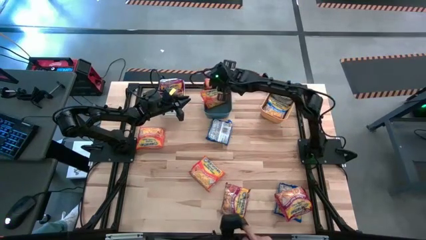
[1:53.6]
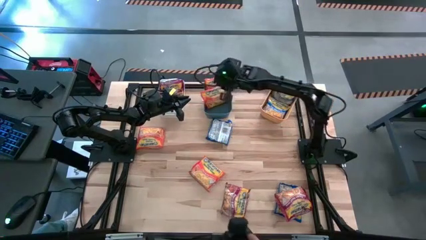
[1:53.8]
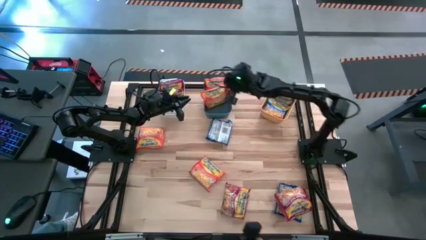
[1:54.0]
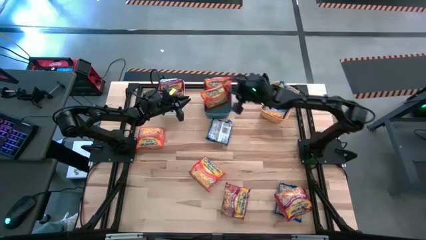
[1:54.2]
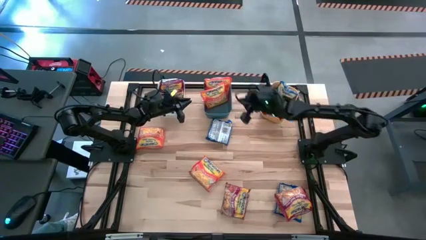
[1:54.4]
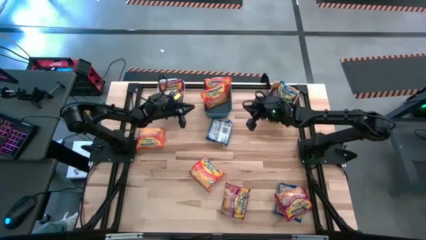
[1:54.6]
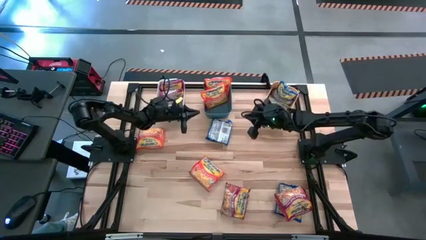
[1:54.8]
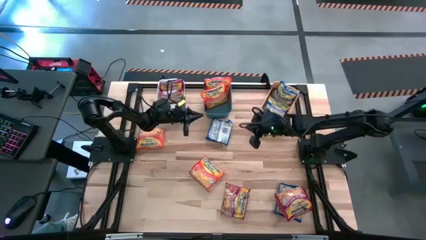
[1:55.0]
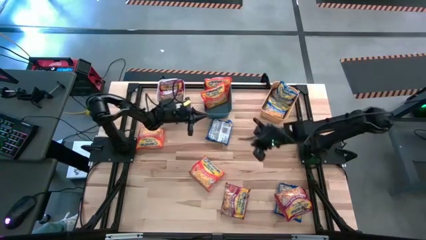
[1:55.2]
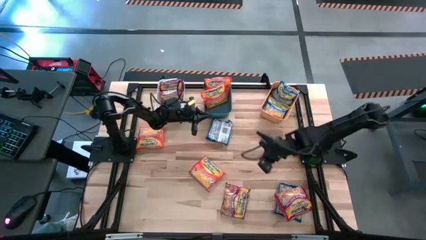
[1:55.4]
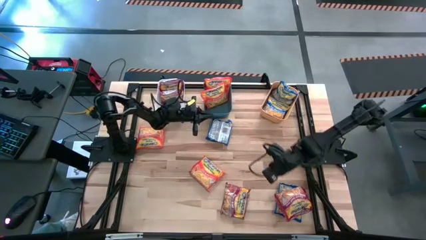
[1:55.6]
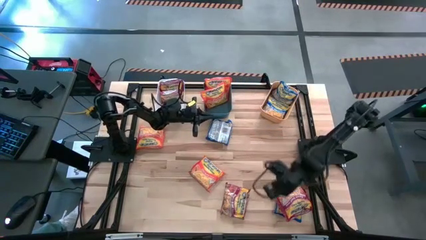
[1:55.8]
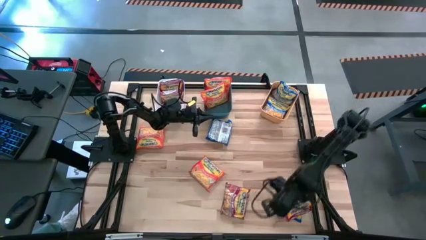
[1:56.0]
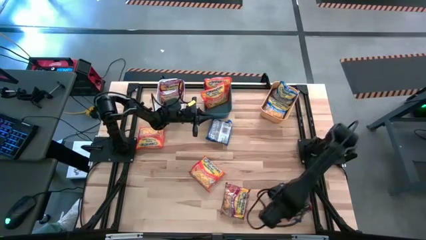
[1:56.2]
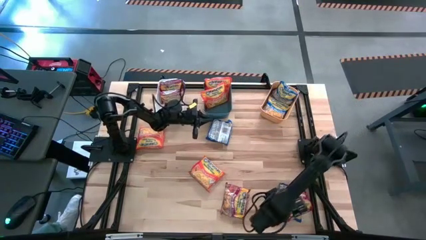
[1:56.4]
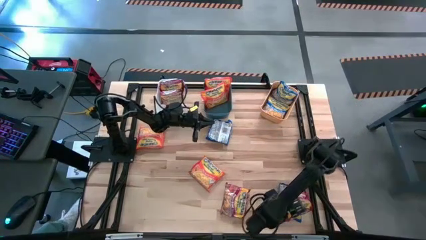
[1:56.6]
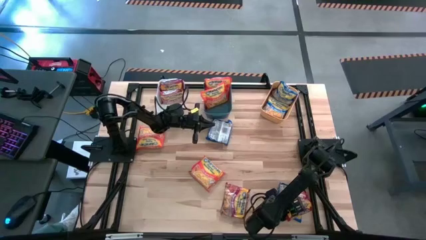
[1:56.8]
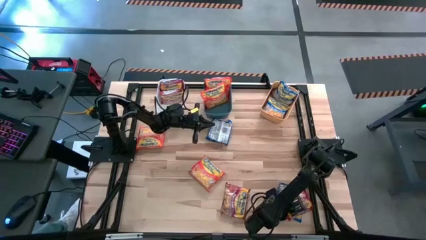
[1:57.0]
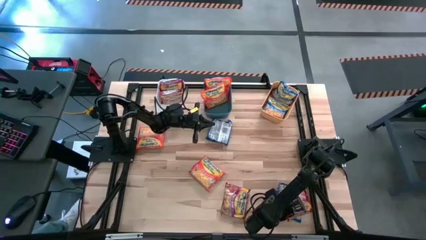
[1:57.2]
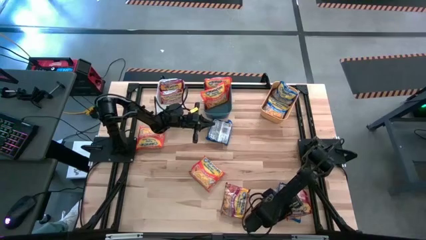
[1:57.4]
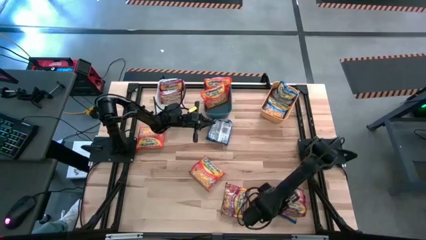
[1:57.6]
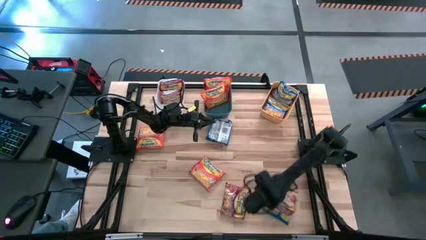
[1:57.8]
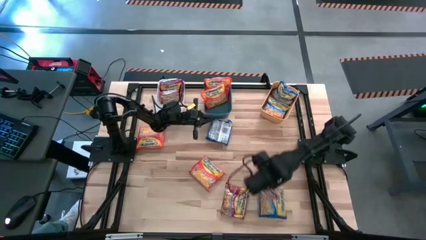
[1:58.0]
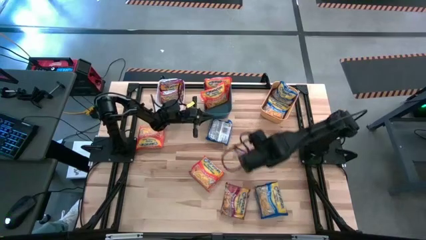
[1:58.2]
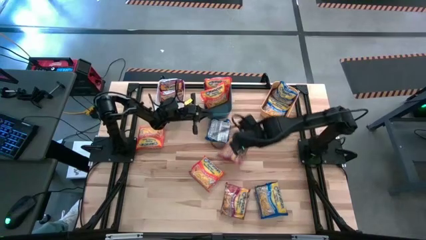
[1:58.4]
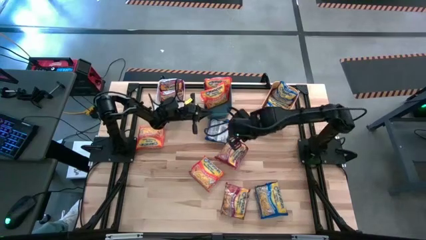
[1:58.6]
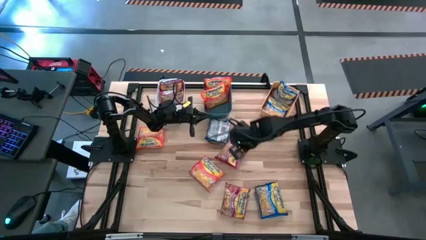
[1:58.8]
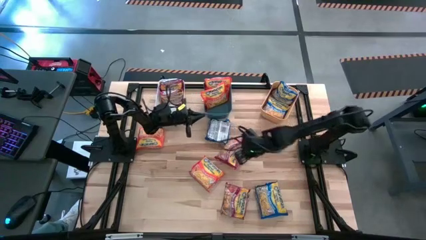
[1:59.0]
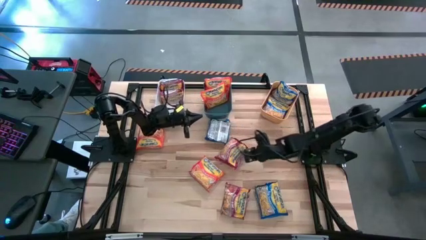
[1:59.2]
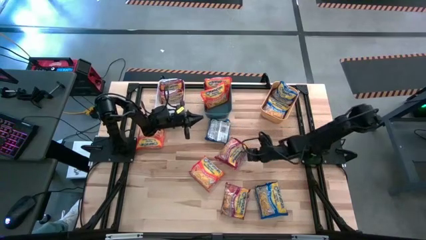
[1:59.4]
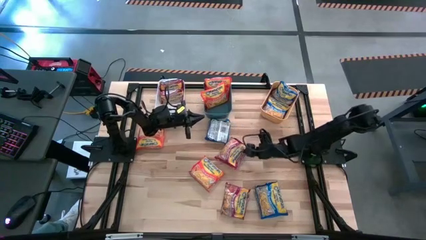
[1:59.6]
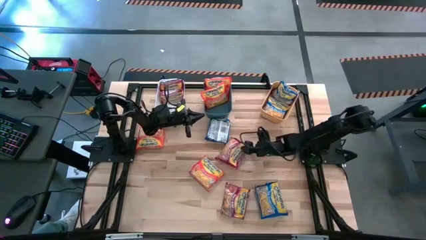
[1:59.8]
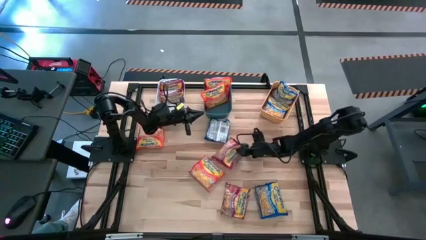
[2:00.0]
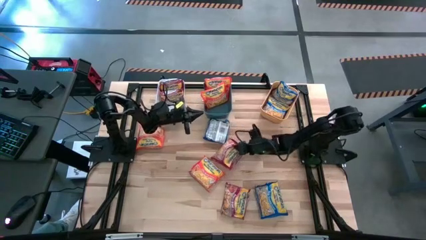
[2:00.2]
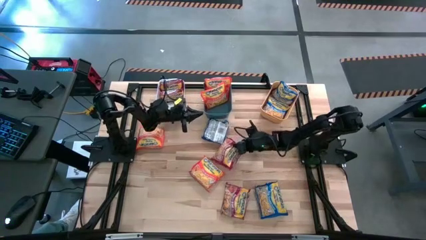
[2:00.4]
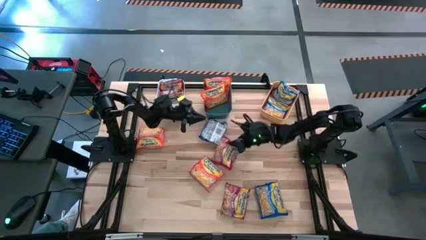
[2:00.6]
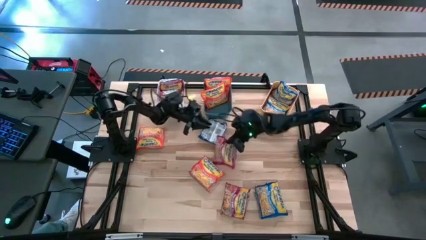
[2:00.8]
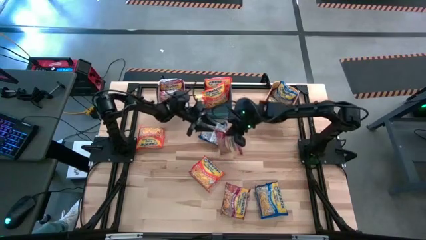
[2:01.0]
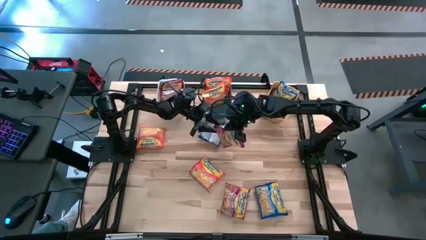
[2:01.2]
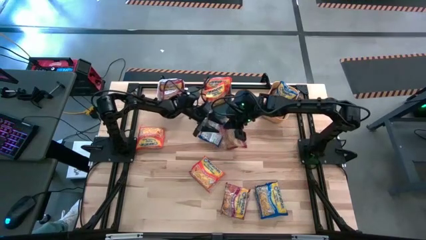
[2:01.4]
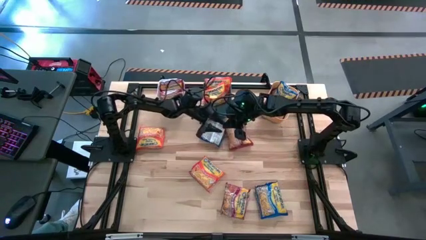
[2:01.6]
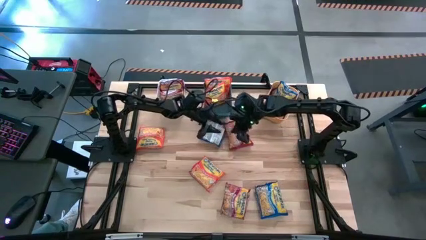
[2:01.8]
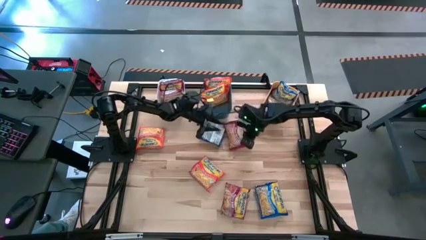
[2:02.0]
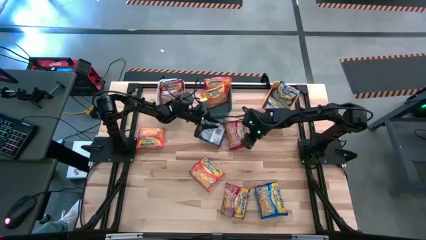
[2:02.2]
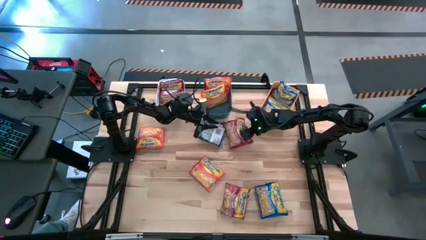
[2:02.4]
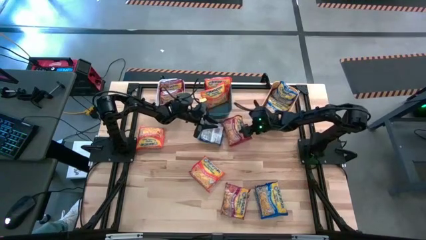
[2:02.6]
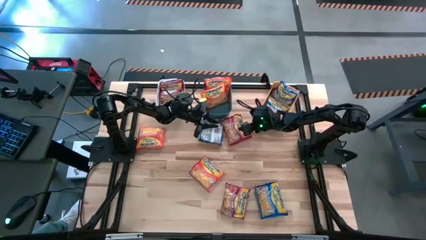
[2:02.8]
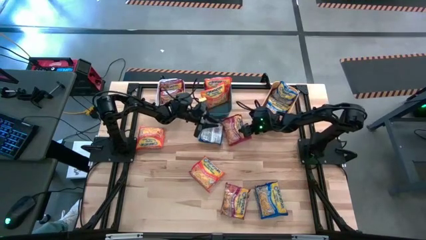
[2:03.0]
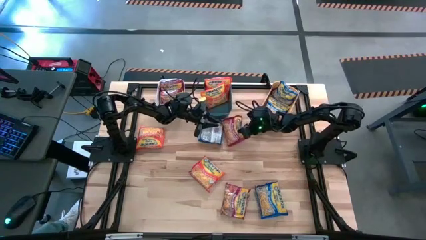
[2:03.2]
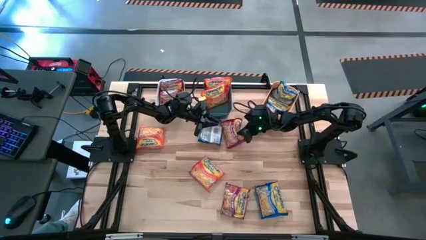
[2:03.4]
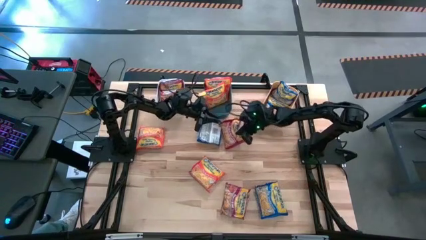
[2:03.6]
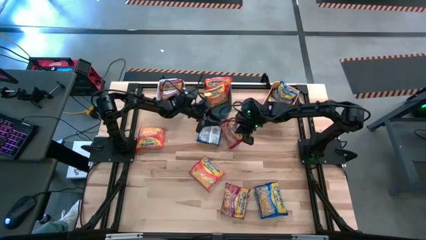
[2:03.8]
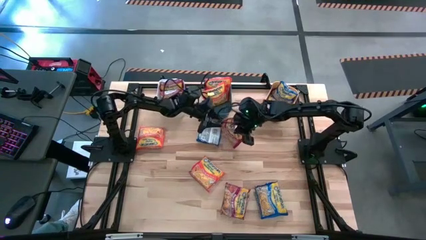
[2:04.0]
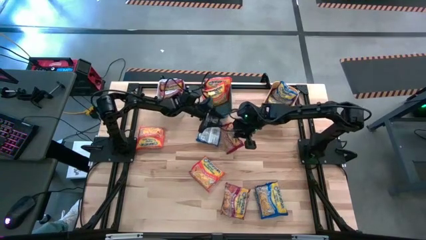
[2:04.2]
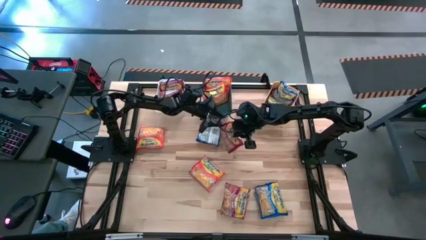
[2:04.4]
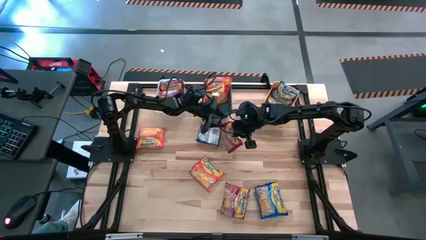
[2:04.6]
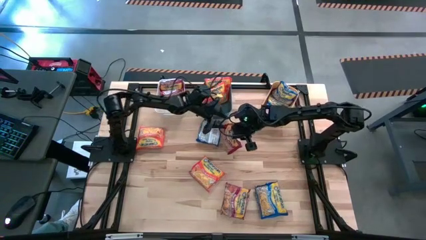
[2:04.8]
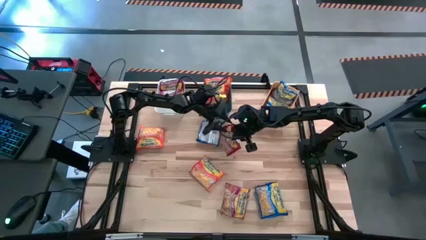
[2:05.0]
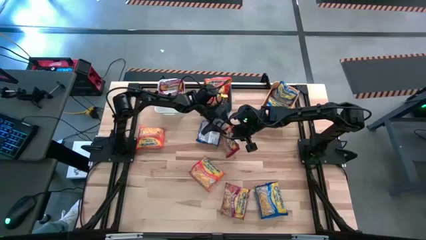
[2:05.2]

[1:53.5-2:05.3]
Task: Sort Maruchan noodles
Put the red noodle pack into the white bin

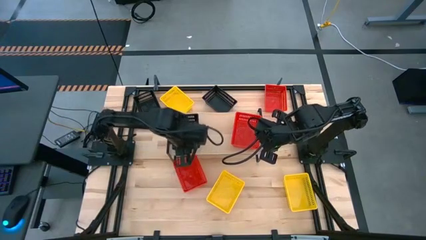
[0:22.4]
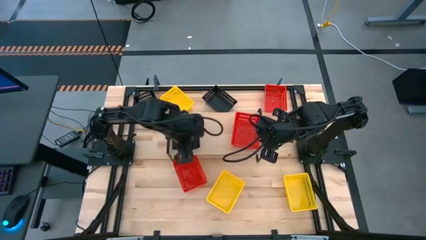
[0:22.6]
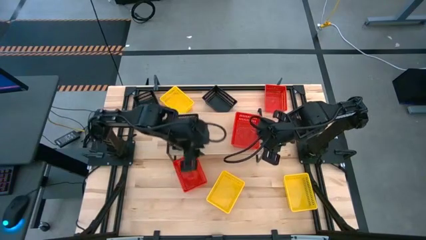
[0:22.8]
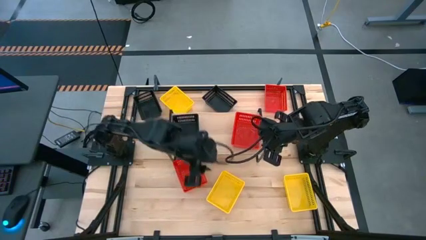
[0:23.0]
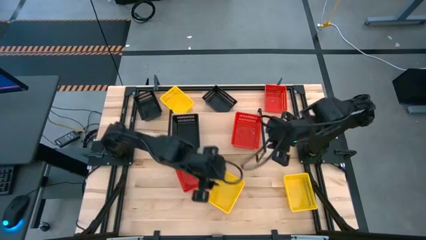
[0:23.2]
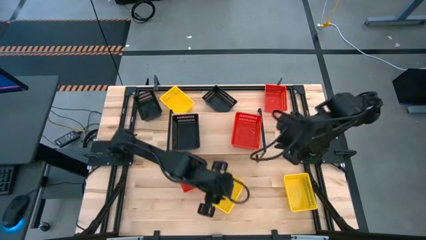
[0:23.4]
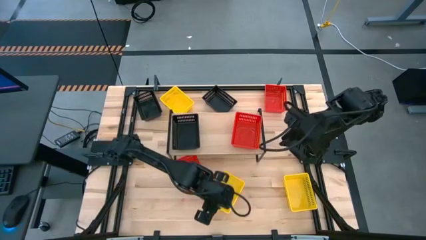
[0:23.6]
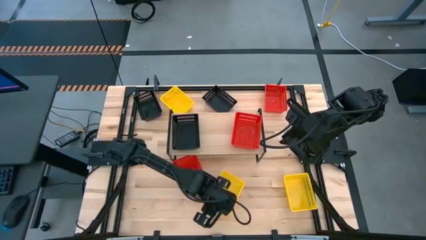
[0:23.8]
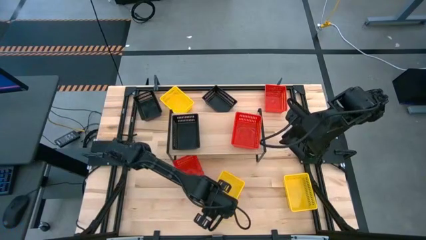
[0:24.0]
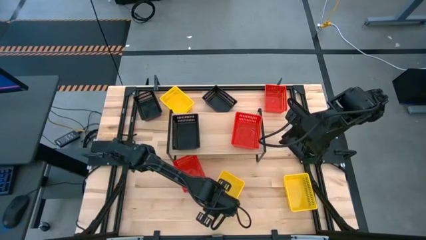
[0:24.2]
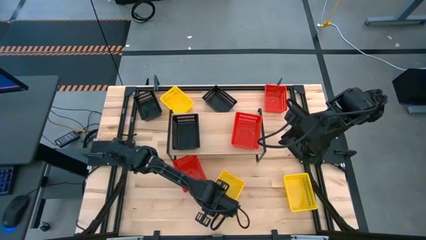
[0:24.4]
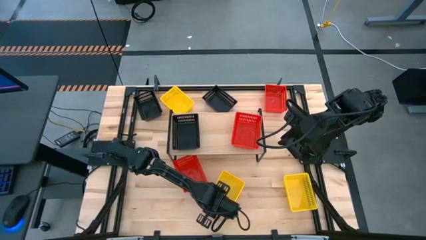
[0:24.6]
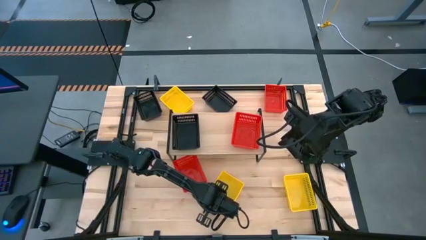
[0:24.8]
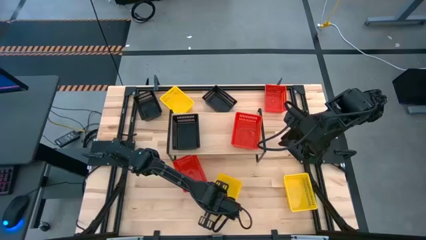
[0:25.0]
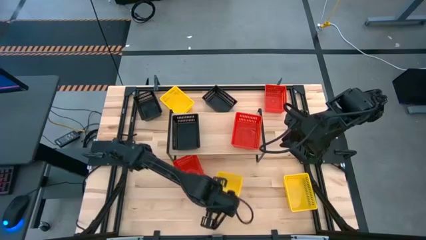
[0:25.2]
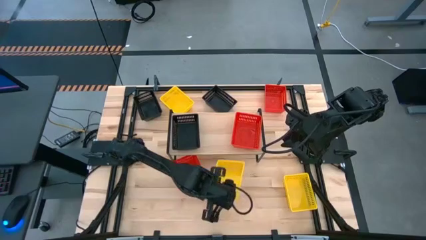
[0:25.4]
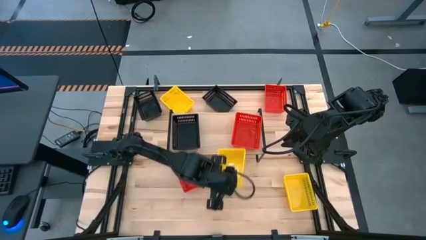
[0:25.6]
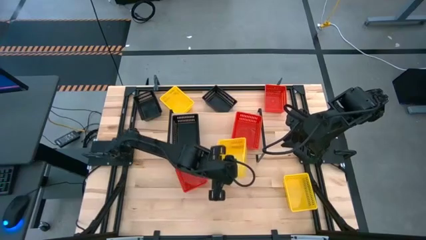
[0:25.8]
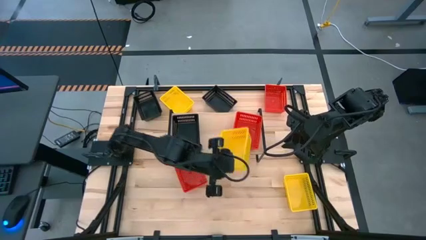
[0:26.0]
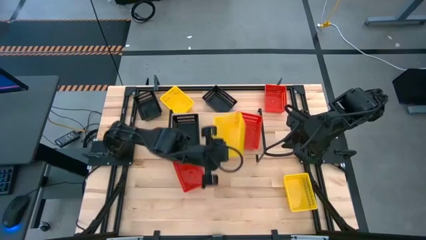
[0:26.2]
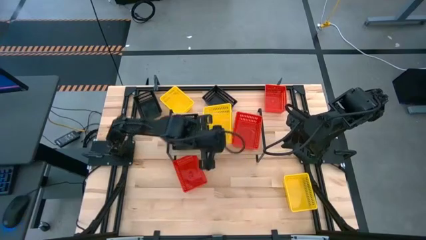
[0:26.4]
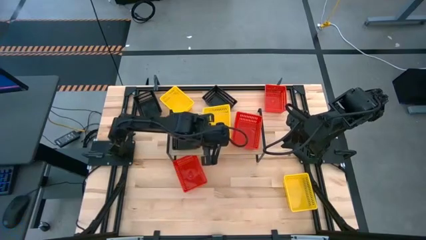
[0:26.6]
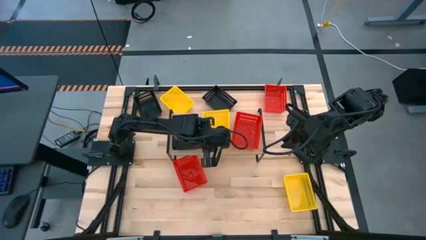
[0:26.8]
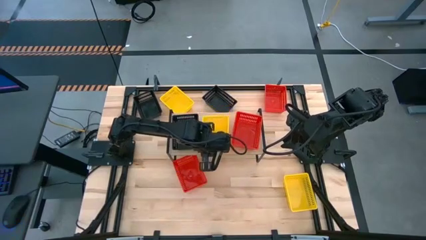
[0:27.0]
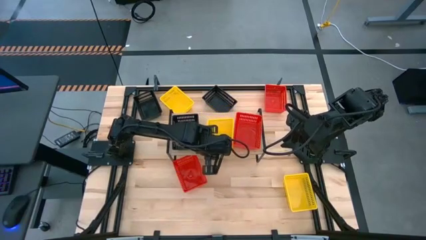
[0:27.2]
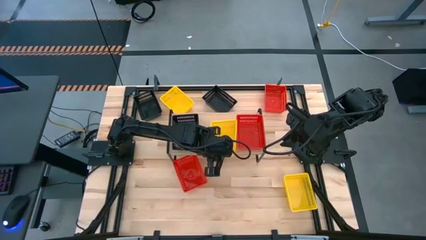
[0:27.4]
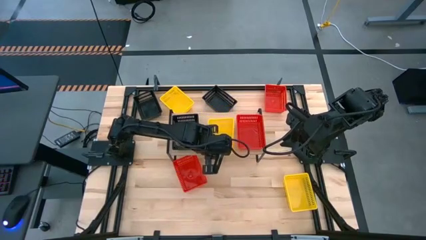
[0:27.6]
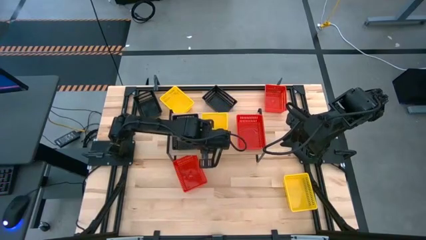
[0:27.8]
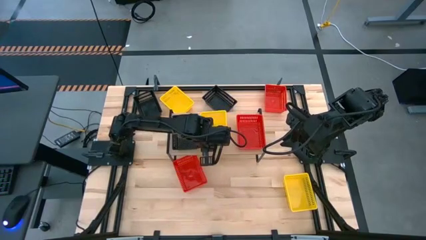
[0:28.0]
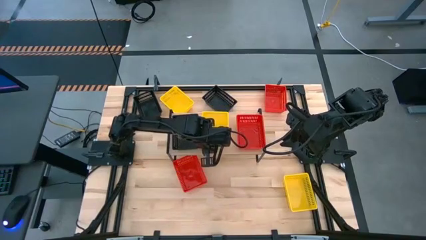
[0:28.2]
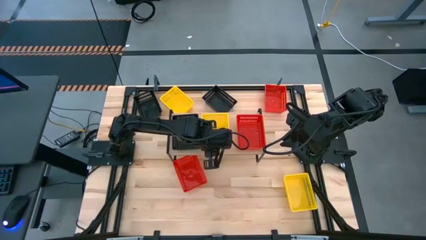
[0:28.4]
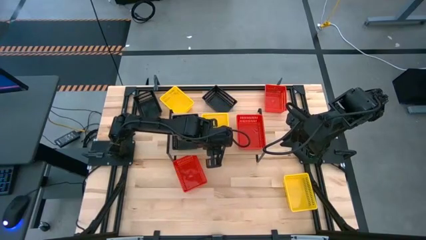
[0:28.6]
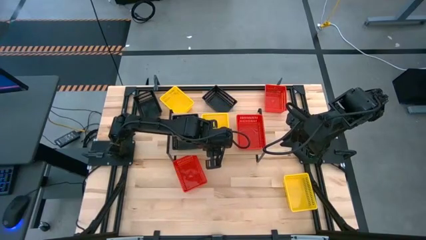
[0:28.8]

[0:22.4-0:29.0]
Task: Stack baskets on shelf by color
Put the bottom left yellow basket on the shelf
